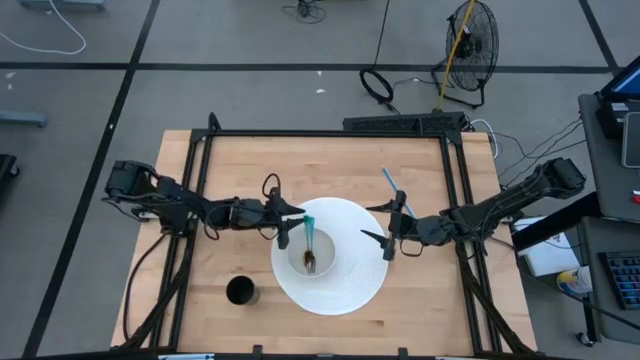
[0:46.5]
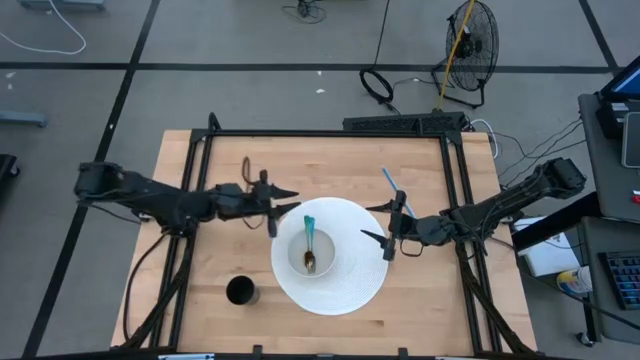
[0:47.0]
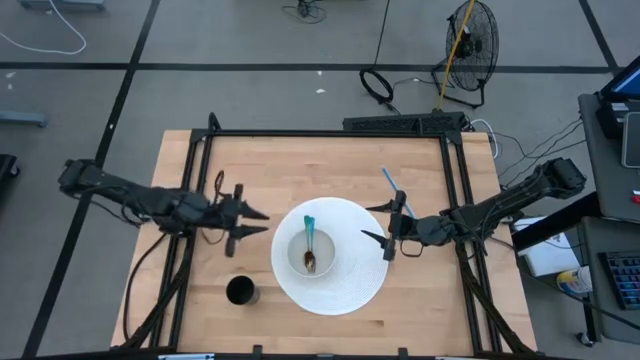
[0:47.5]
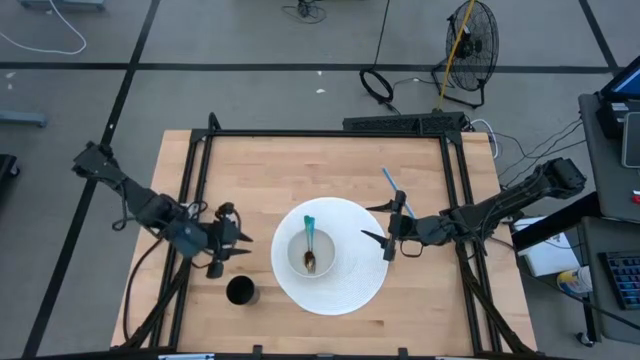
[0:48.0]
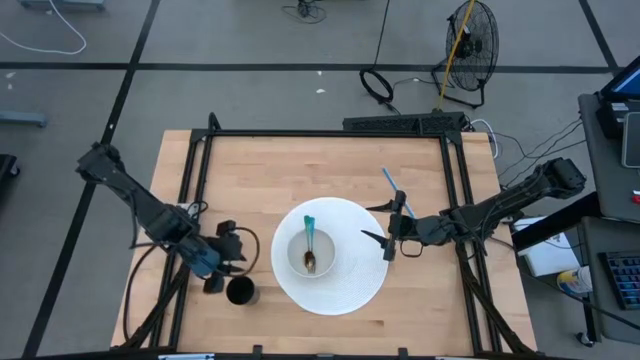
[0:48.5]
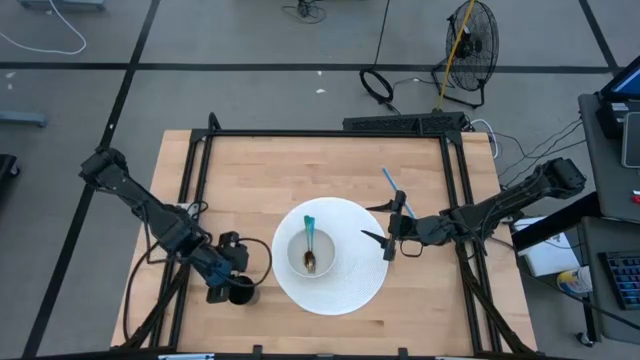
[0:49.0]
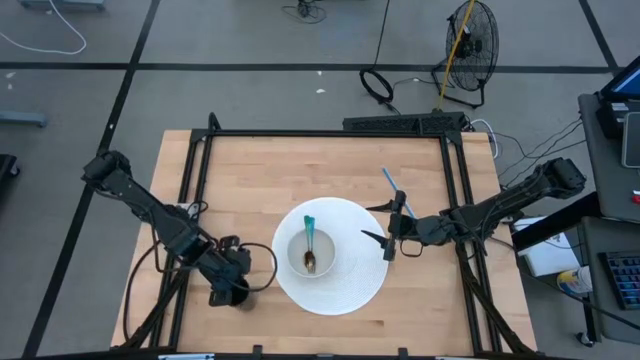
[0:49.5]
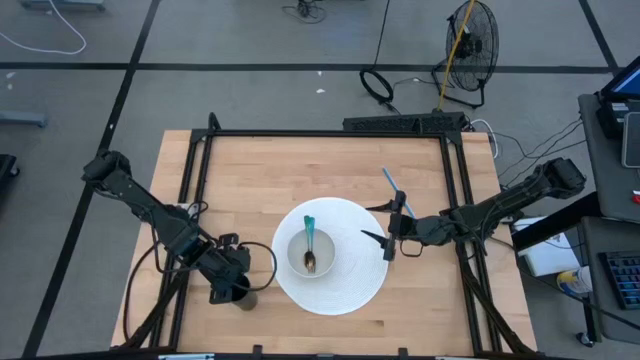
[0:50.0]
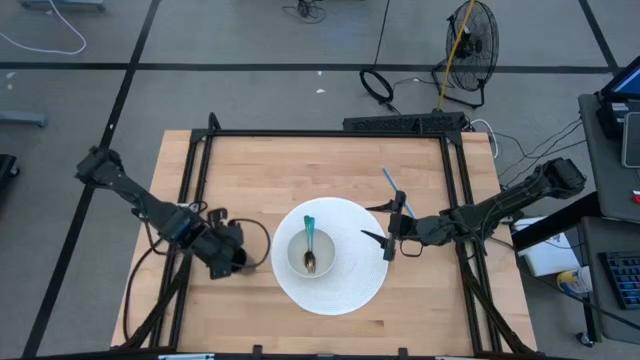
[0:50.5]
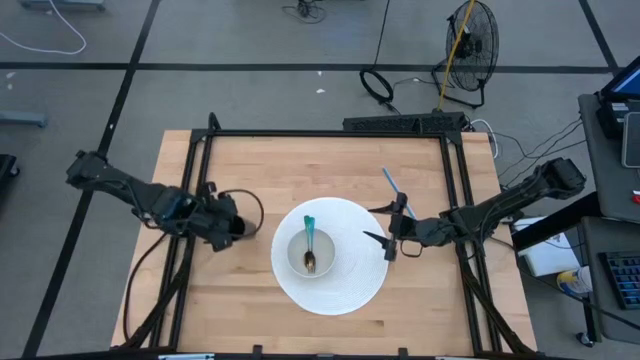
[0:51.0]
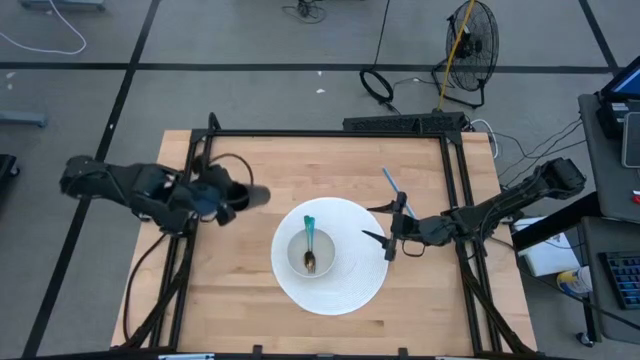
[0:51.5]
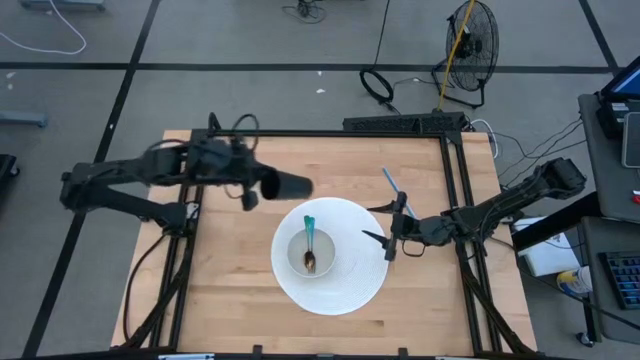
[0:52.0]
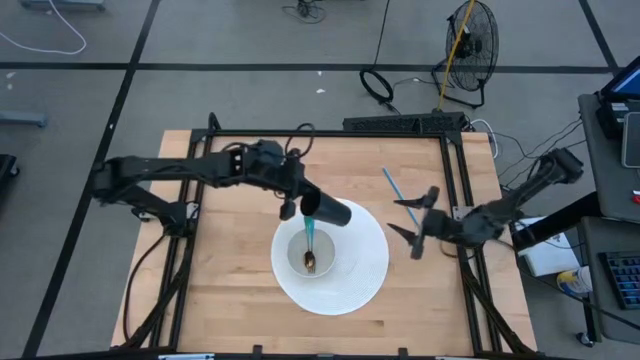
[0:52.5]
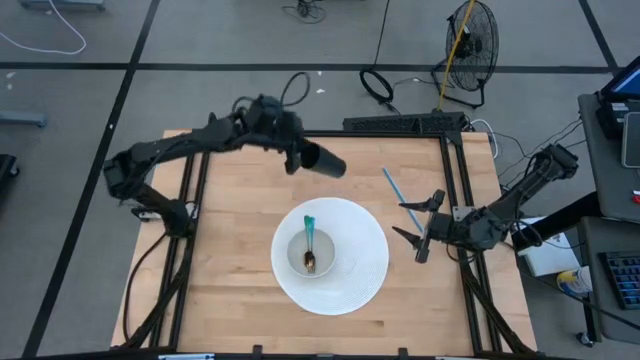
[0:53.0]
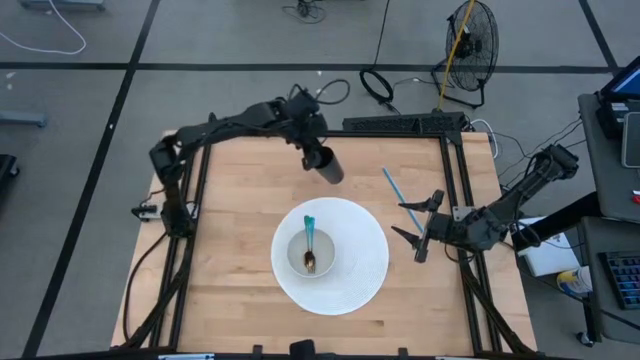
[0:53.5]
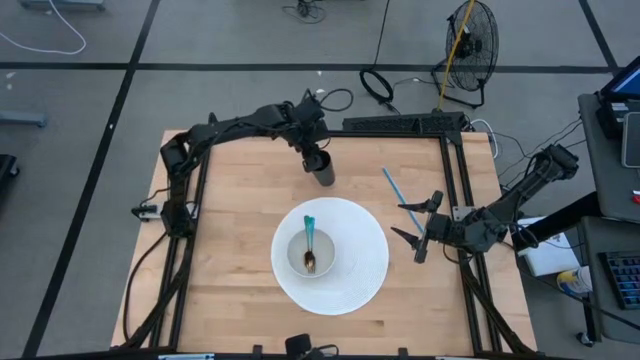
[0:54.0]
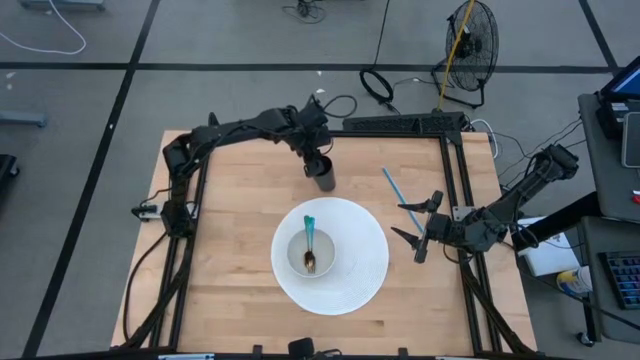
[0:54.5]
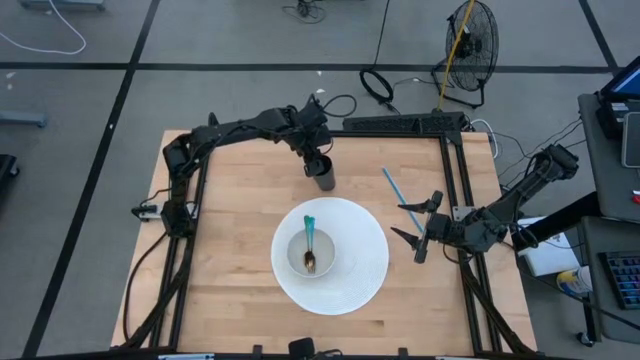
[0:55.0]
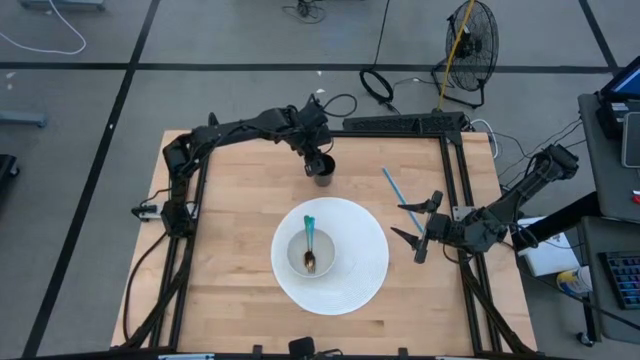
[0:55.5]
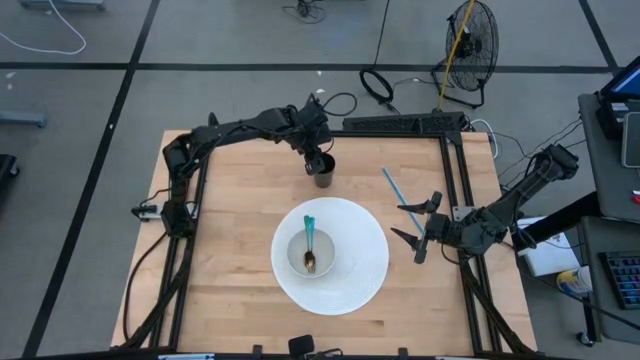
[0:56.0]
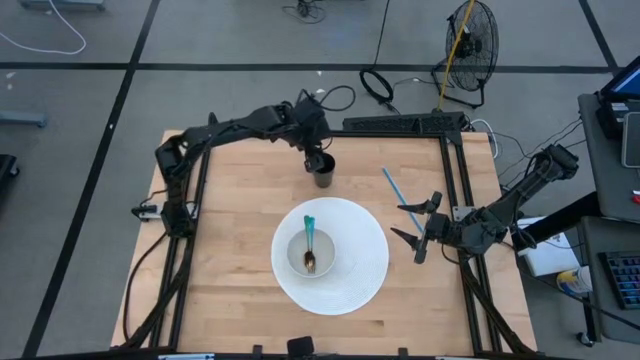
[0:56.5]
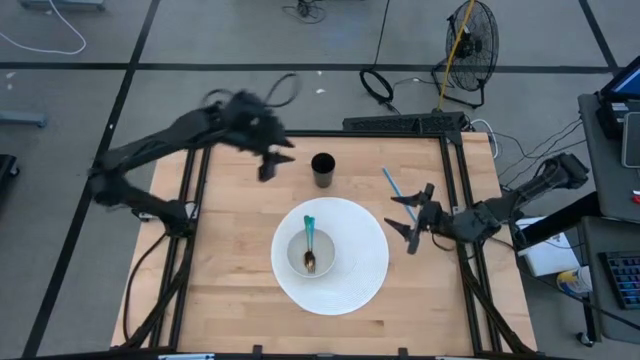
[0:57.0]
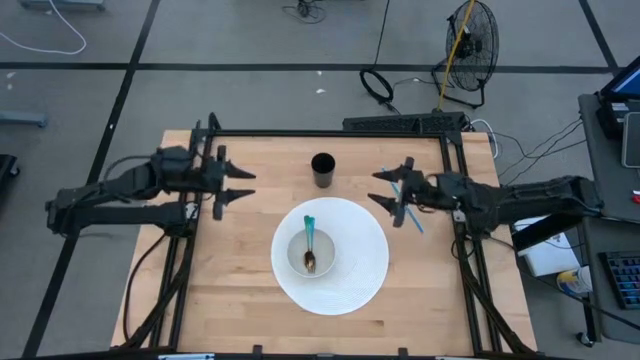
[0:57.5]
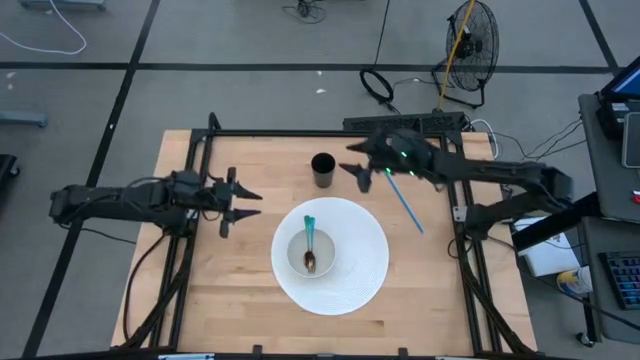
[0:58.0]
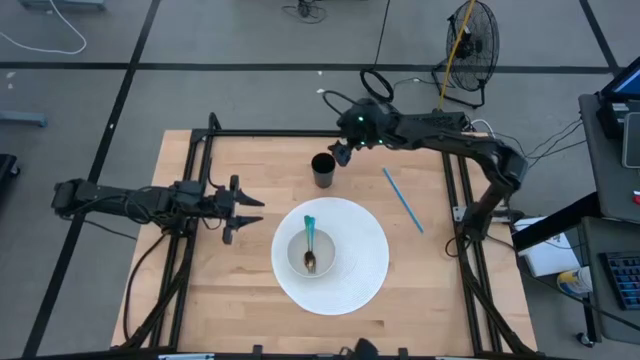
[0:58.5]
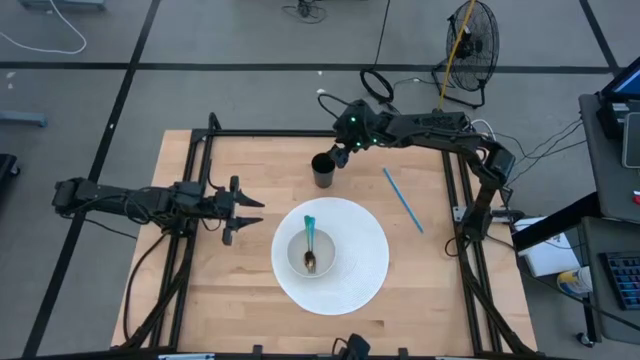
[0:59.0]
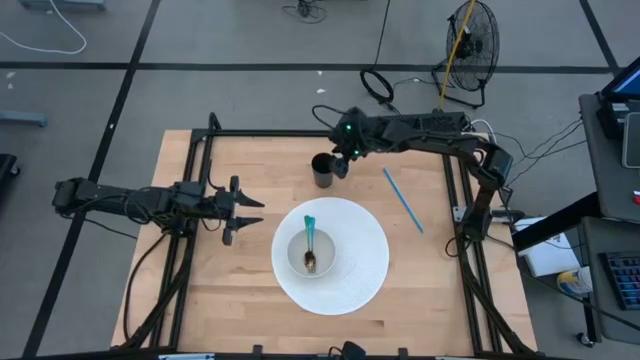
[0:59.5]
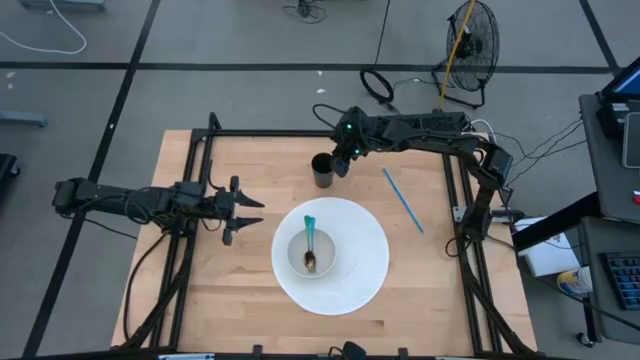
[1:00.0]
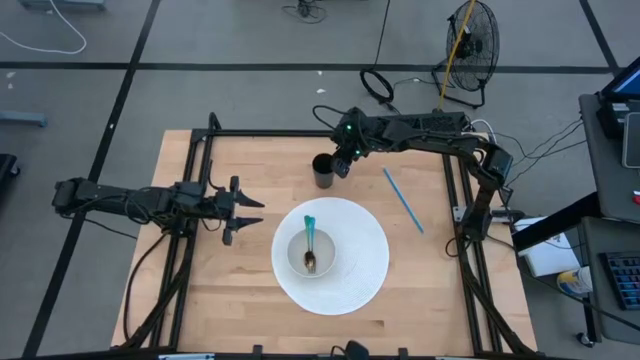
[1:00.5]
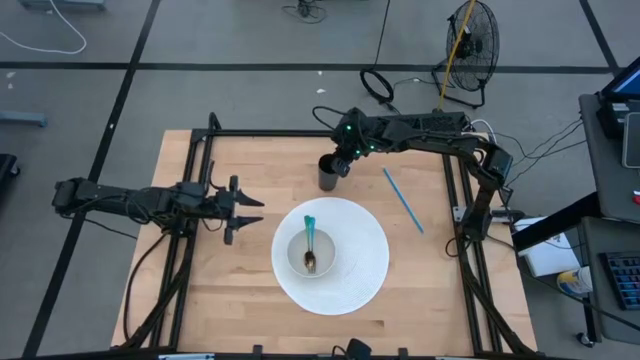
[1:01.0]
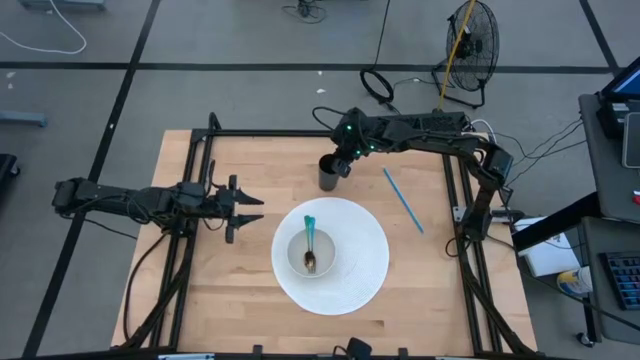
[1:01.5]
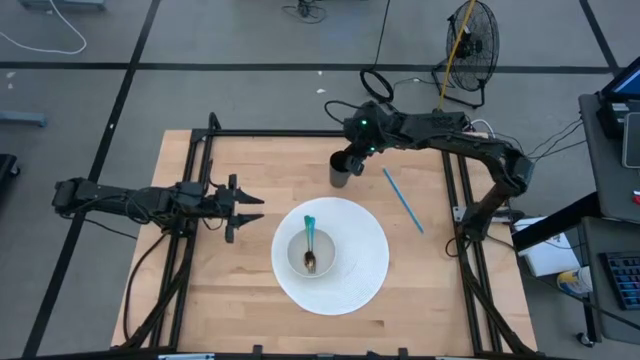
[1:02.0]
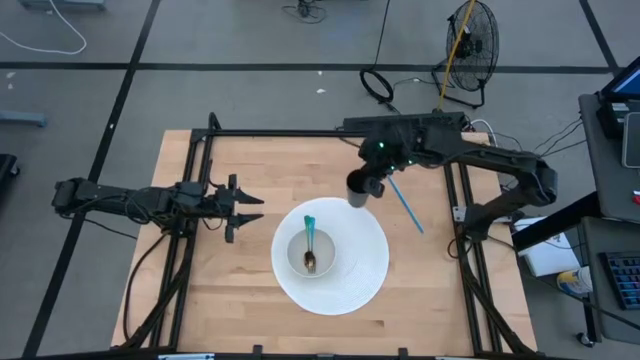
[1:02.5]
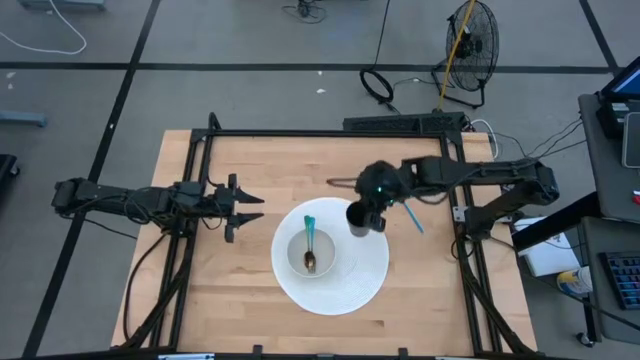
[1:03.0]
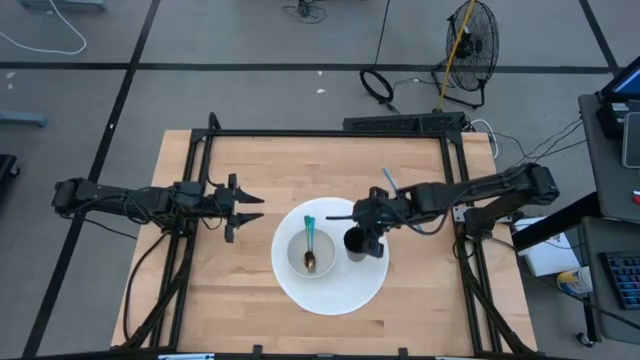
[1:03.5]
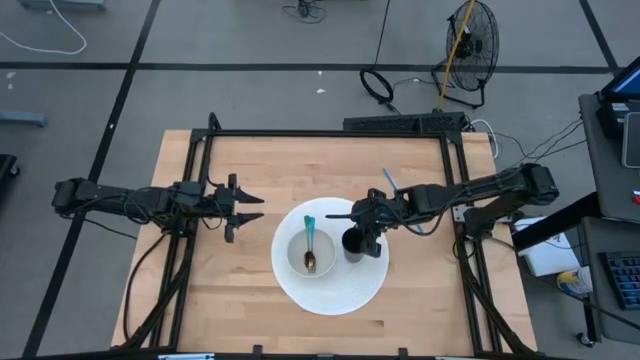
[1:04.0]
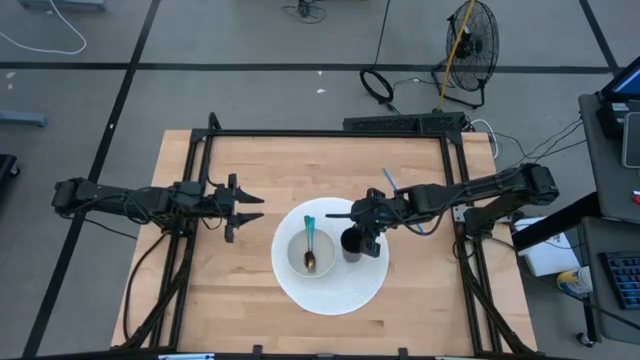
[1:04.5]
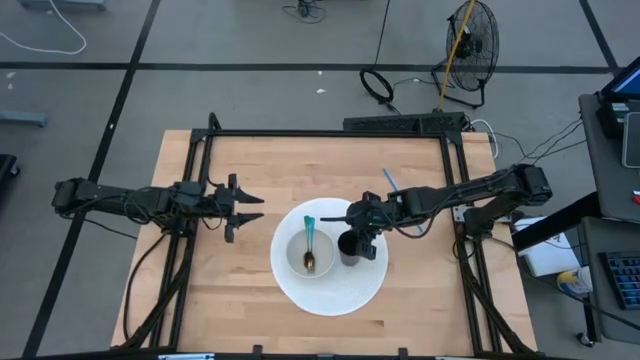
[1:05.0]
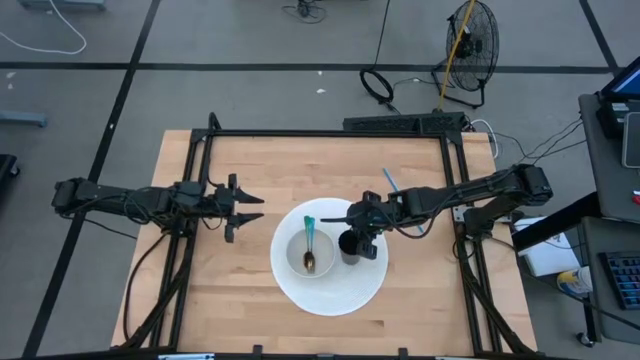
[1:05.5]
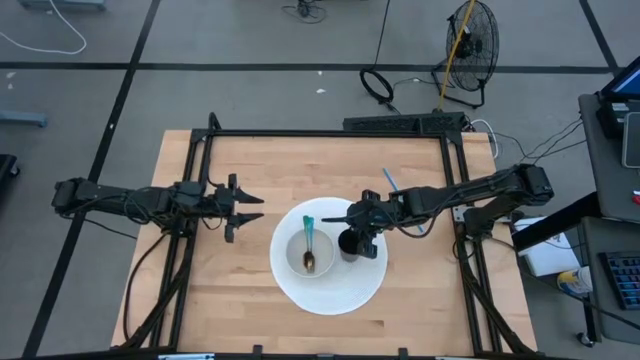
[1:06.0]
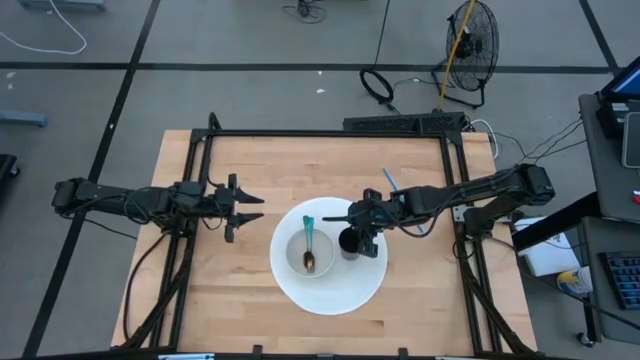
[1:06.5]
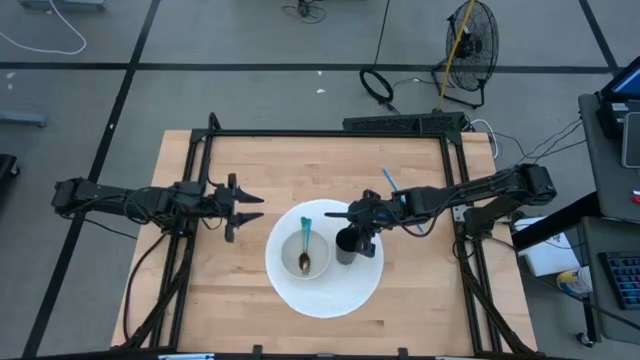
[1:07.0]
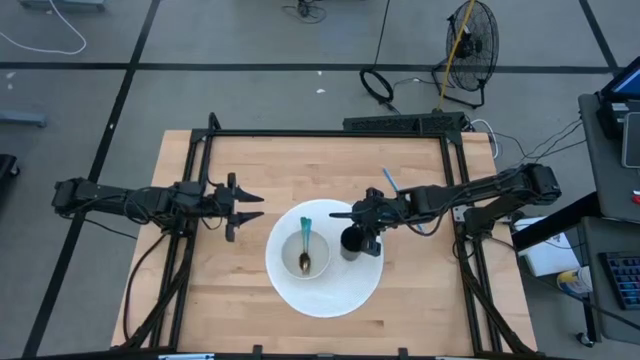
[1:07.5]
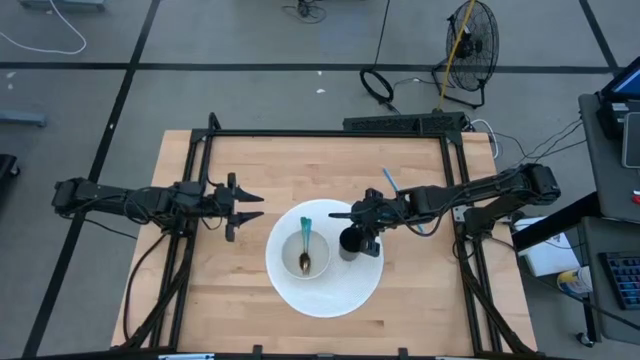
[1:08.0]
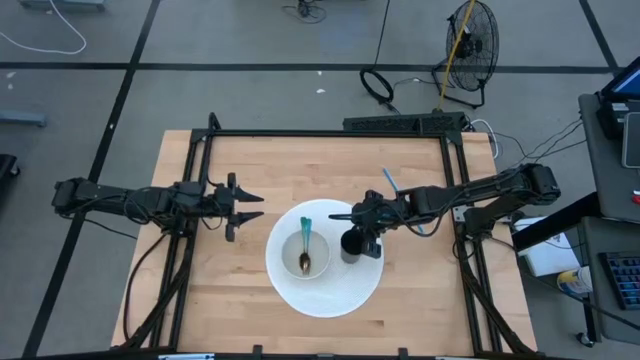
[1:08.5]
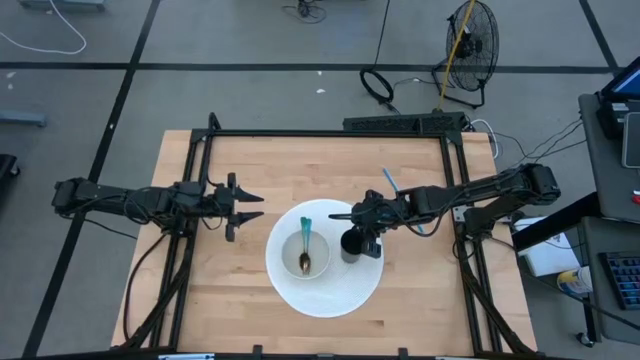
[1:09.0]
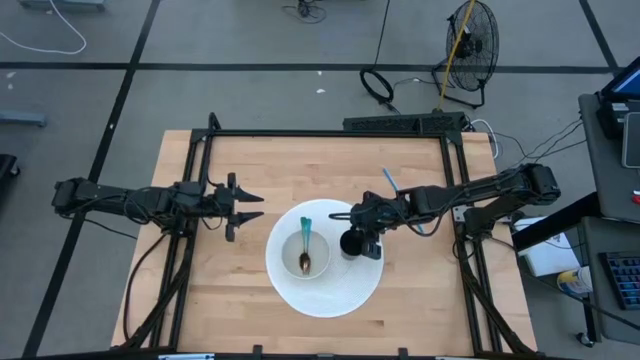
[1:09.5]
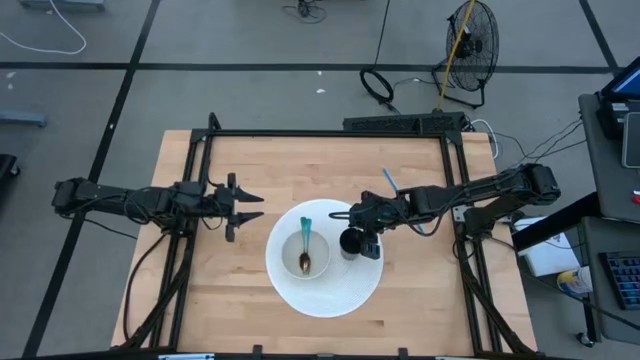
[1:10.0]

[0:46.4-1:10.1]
Task: Pick & Place Utensil
Put the black cup on the white mat to the right of the white bowl
